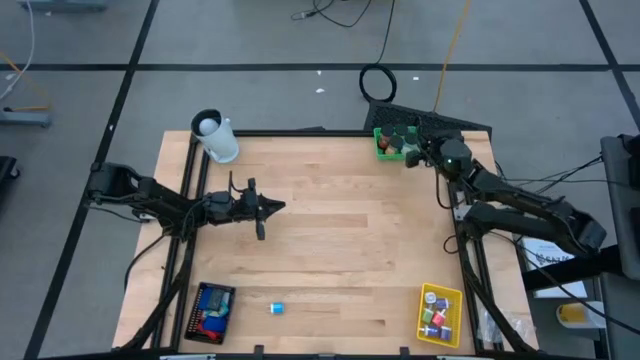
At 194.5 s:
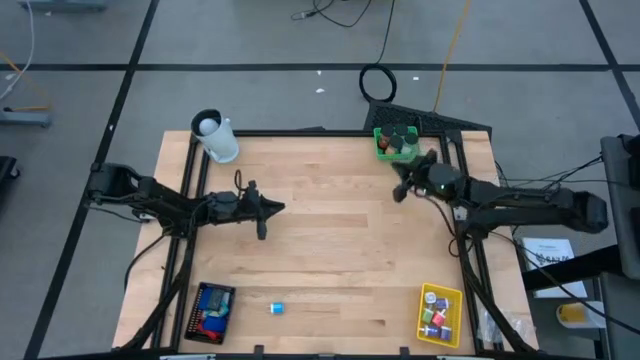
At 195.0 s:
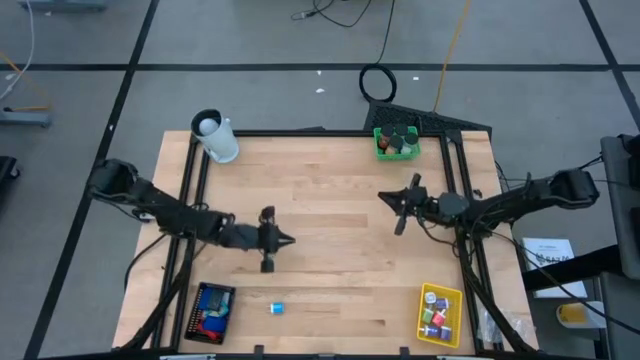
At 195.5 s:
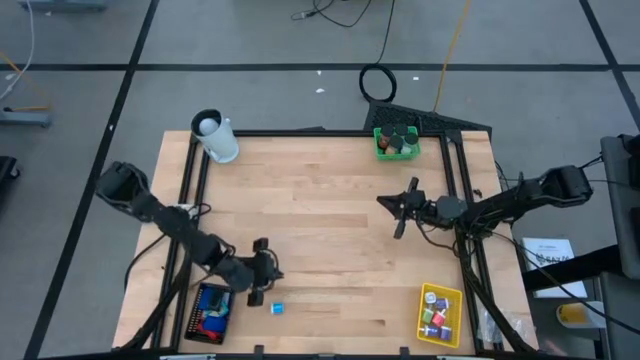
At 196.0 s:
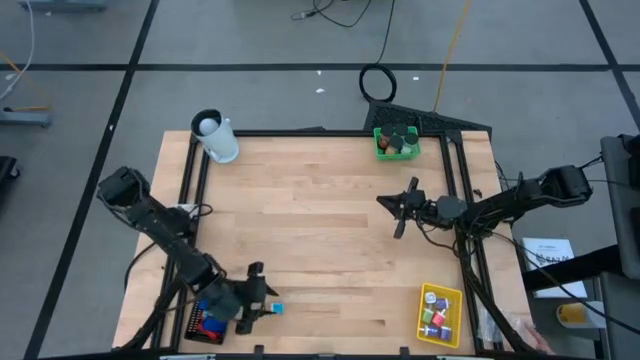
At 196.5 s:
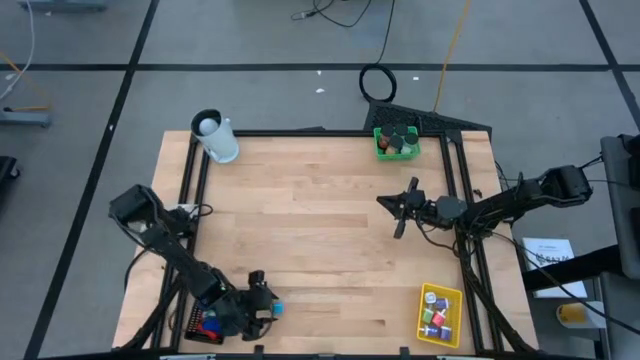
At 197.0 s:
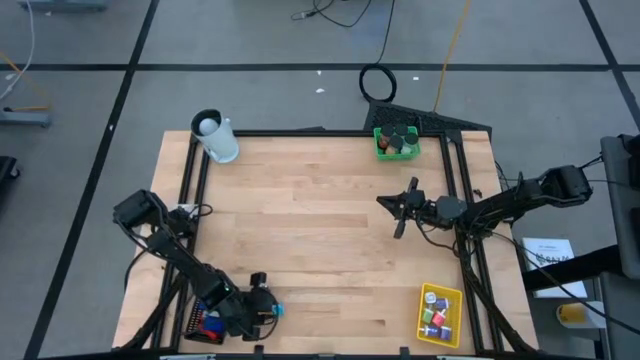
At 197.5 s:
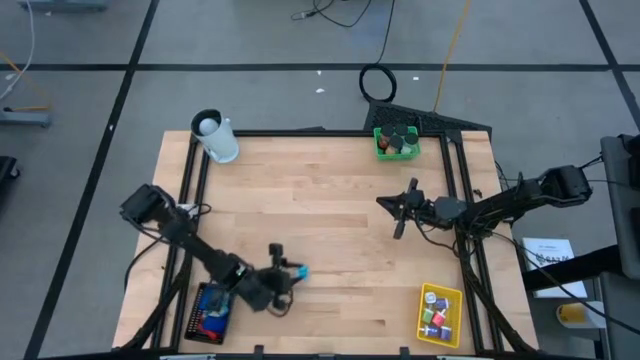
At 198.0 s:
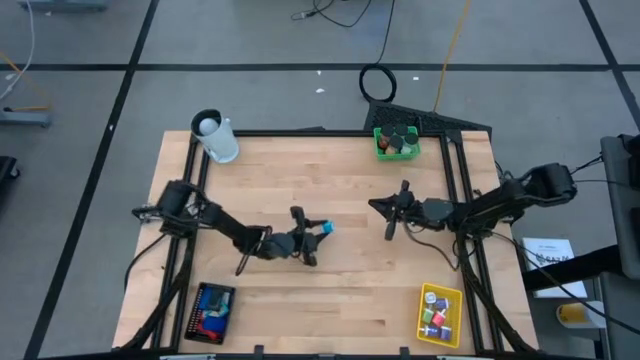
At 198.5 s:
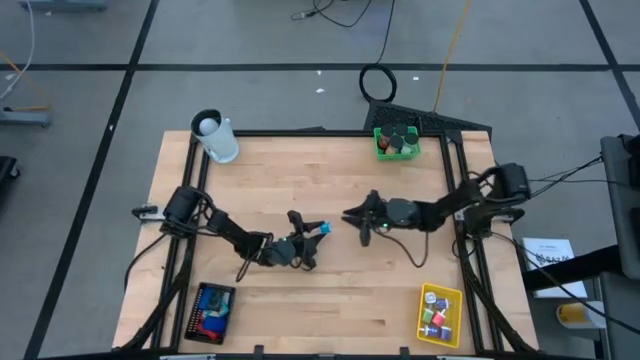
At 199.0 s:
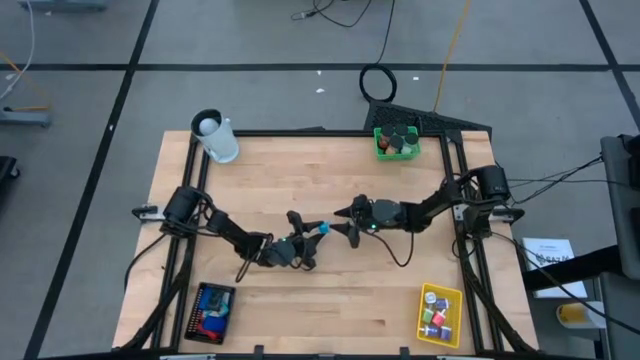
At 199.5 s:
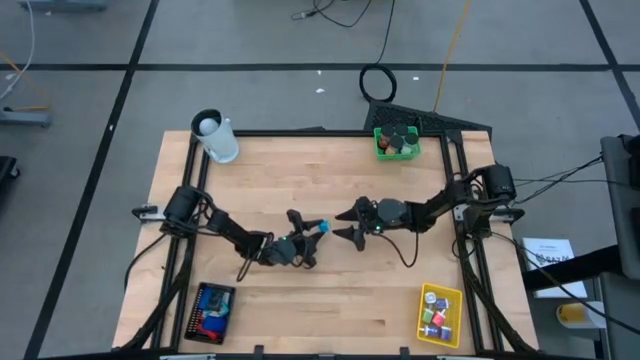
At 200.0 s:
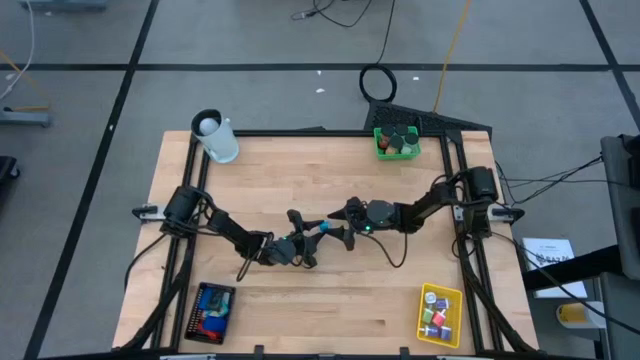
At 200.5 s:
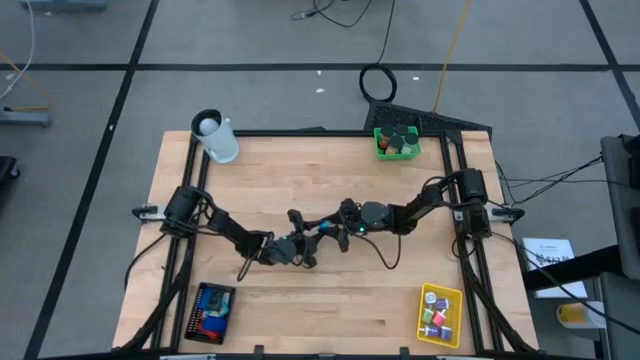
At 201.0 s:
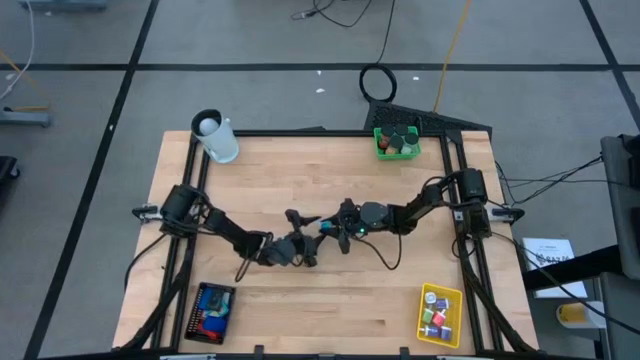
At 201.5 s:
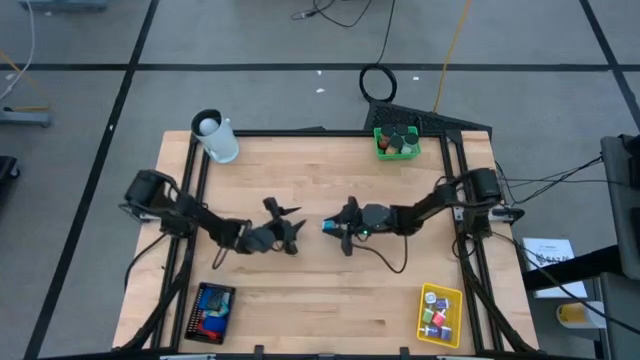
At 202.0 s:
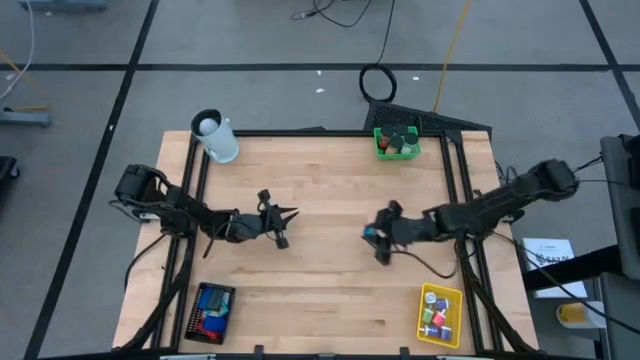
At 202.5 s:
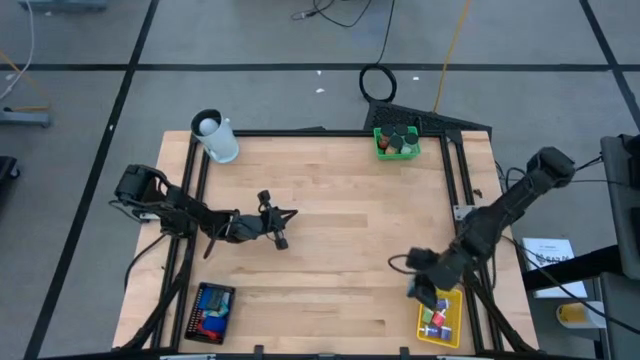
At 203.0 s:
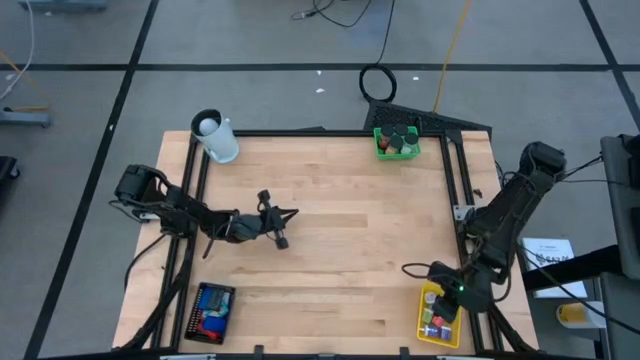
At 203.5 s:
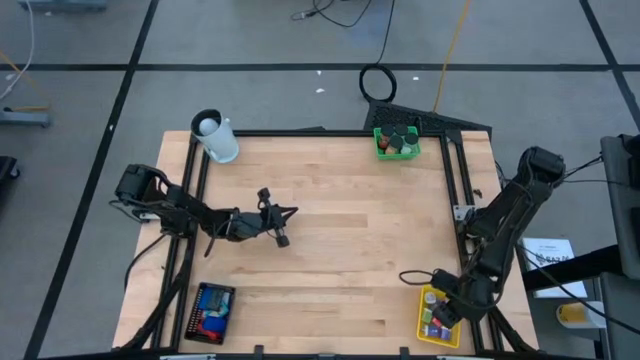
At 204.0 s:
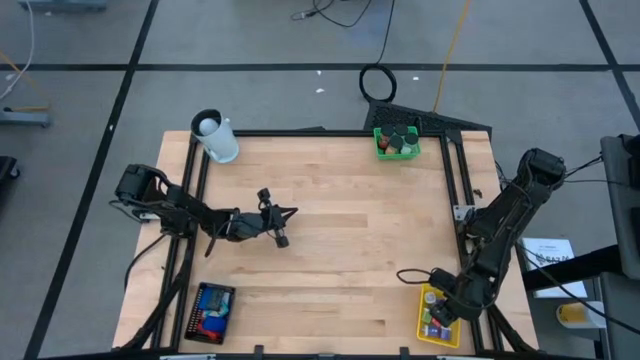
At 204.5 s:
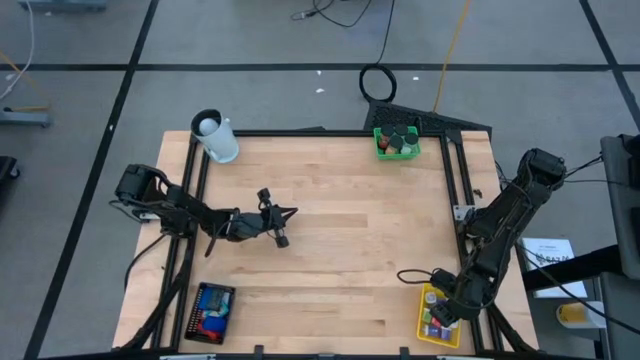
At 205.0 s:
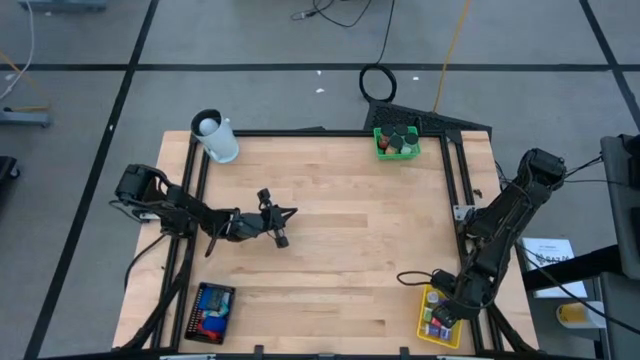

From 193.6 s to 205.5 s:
Task: Pick & Place Office items
Put the blue charger adapter into the yellow bin

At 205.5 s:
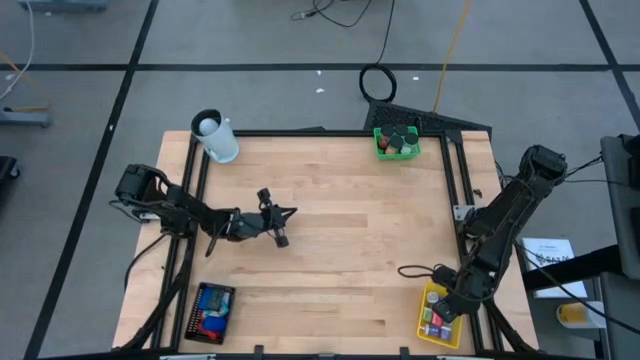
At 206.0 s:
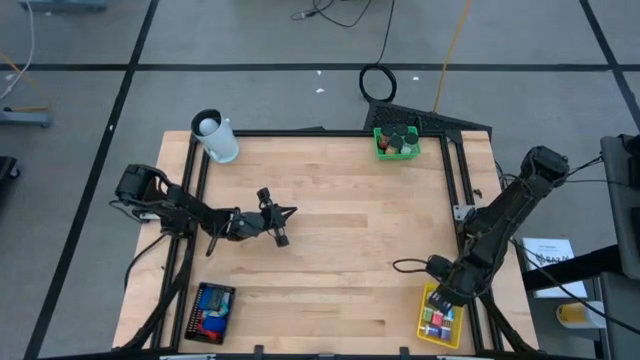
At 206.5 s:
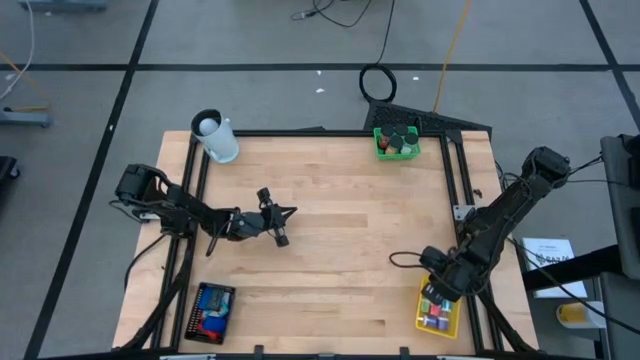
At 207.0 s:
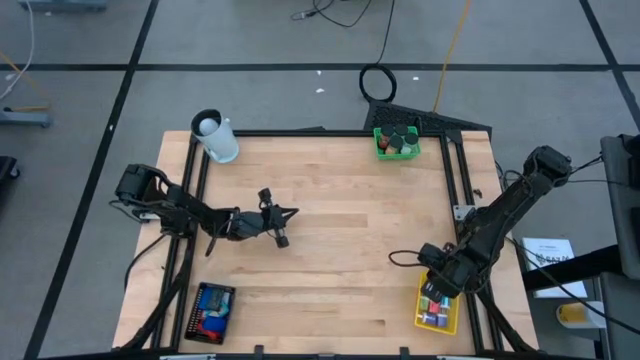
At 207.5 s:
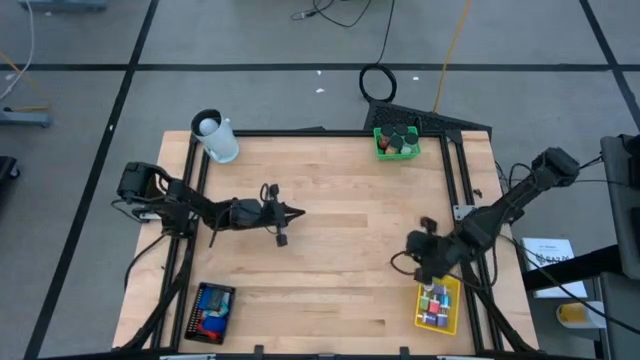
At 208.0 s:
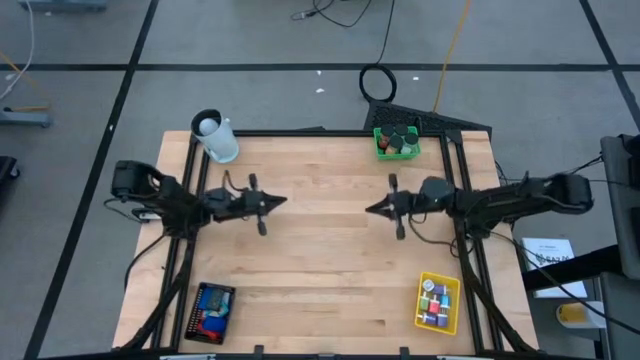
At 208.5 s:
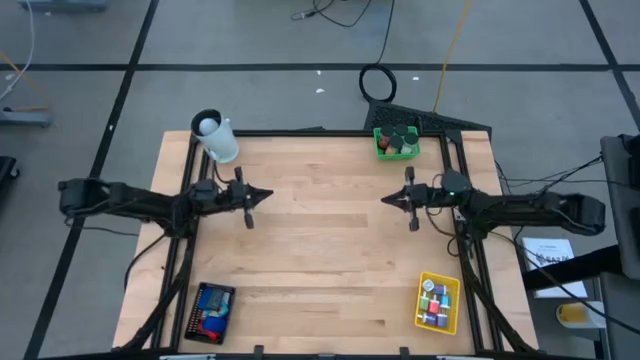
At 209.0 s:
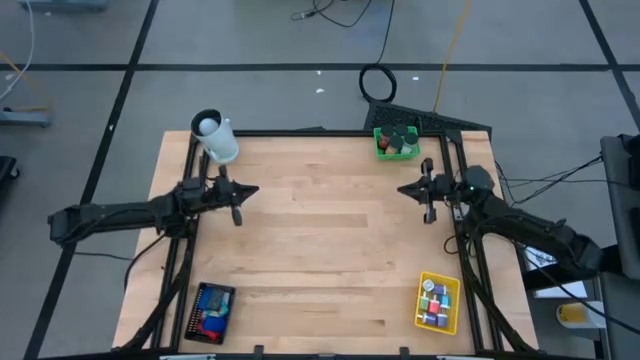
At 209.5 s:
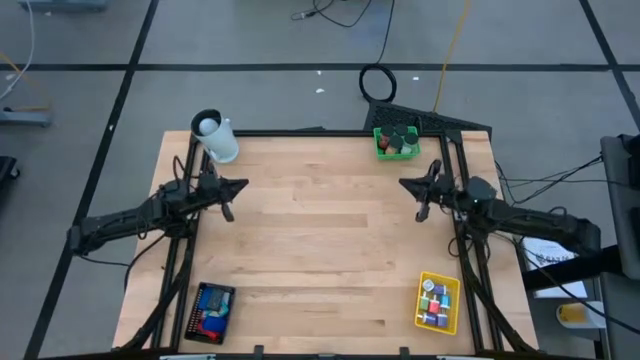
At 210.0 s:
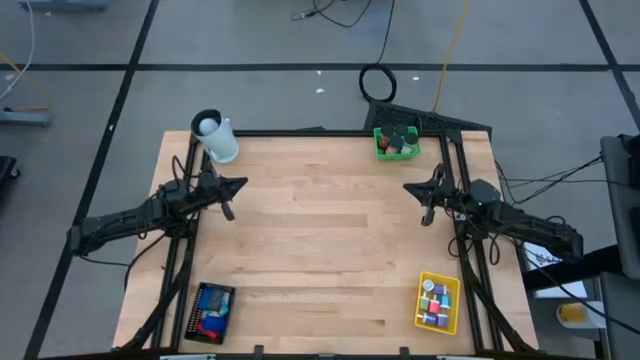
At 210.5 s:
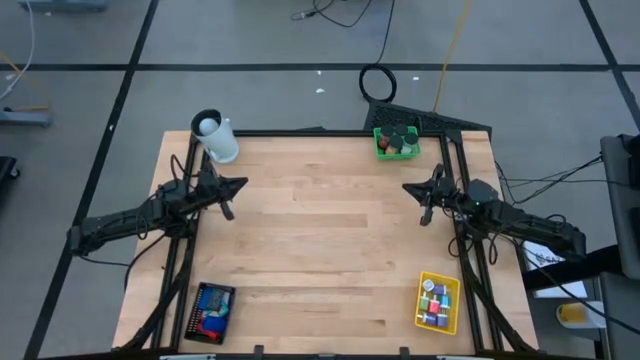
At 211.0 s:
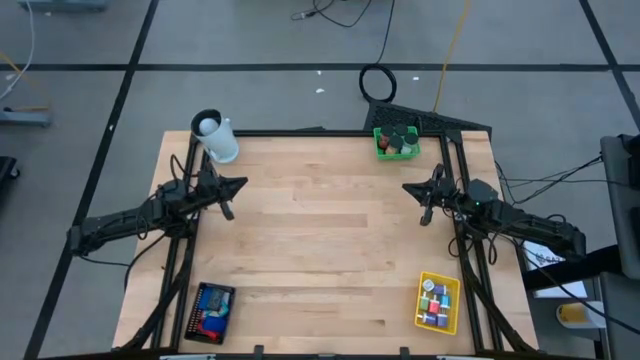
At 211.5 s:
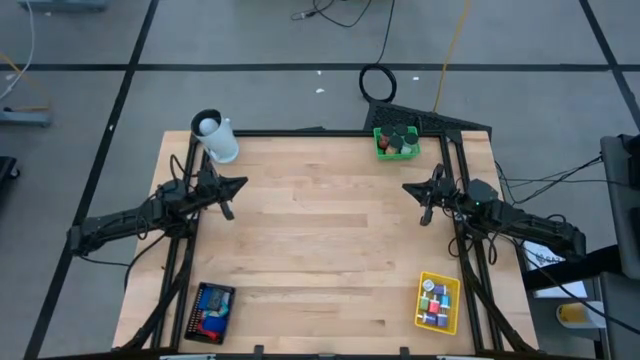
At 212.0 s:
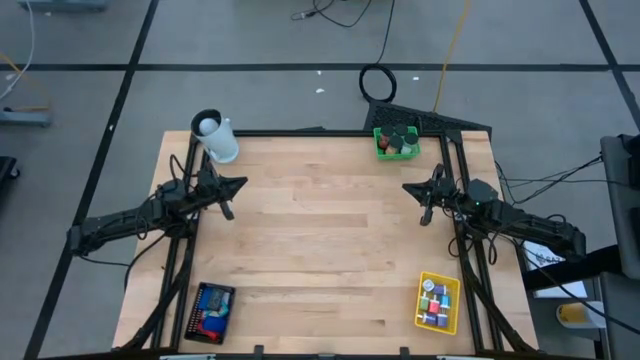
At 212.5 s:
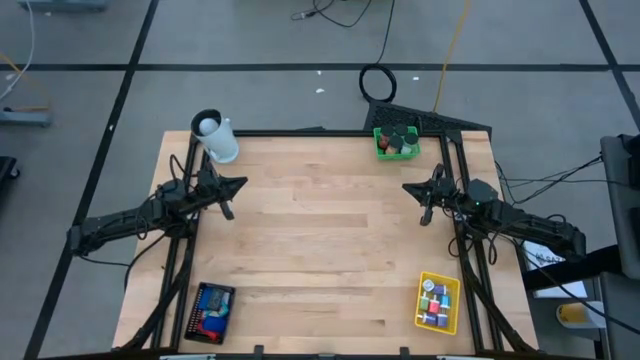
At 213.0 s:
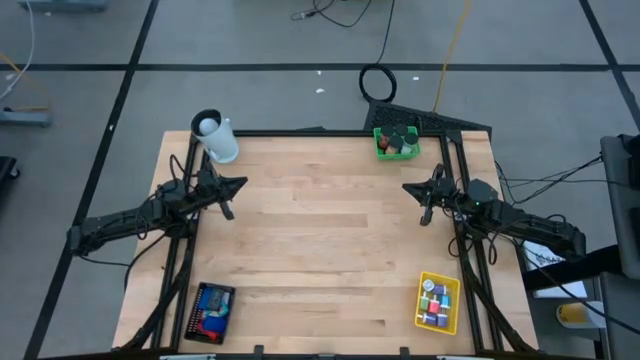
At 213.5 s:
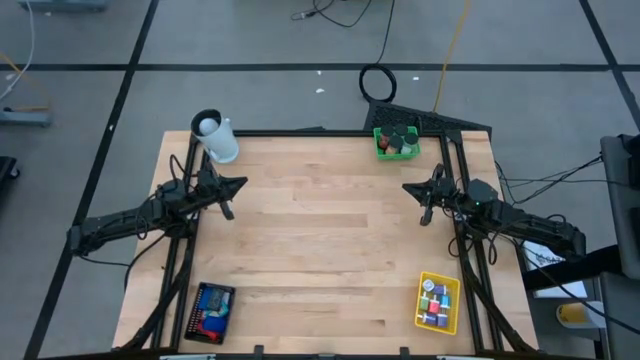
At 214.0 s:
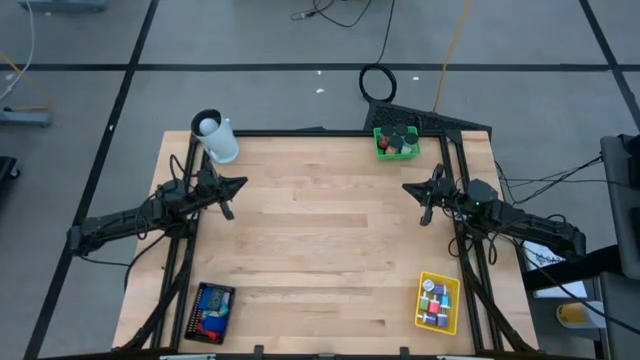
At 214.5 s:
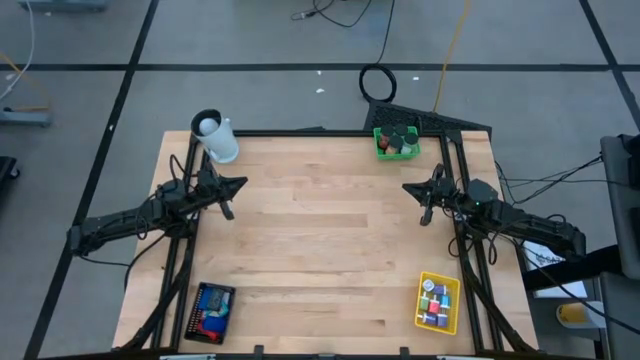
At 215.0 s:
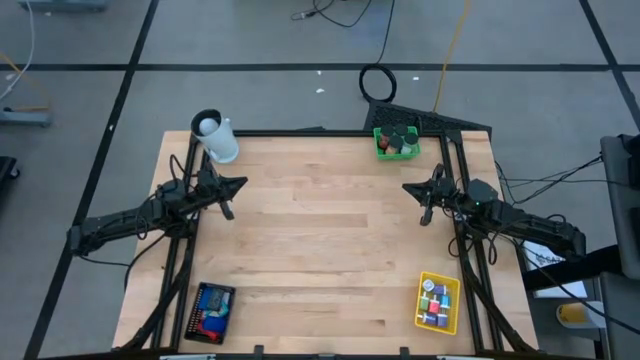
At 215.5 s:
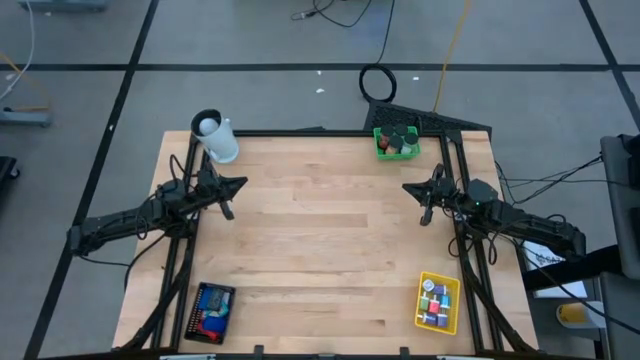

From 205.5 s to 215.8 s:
Return to Home Position

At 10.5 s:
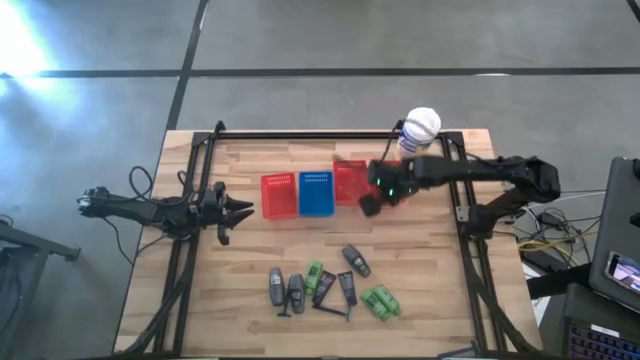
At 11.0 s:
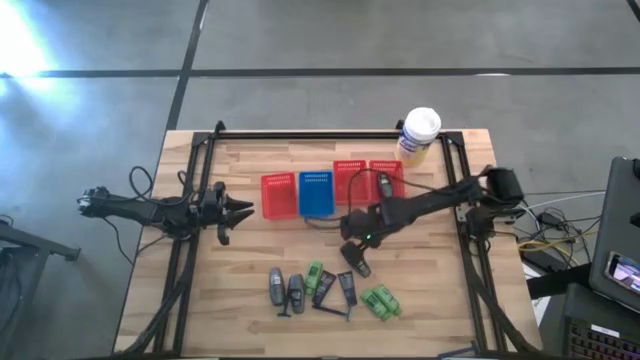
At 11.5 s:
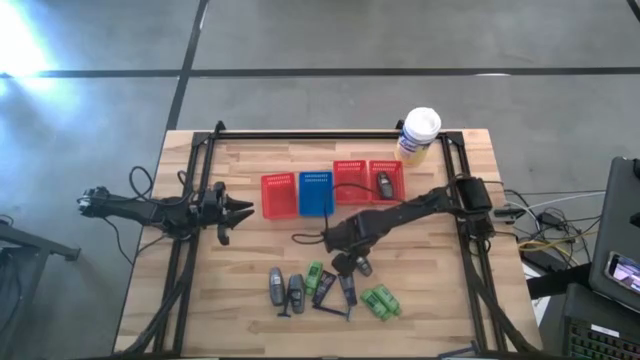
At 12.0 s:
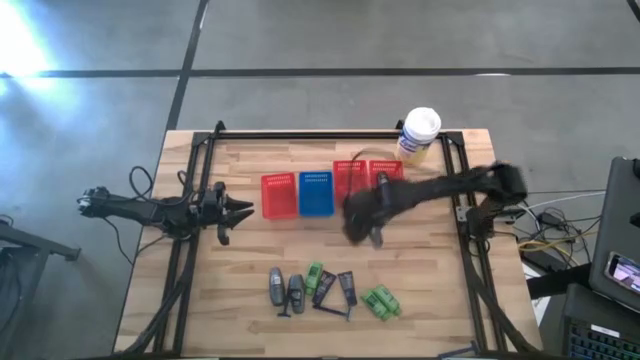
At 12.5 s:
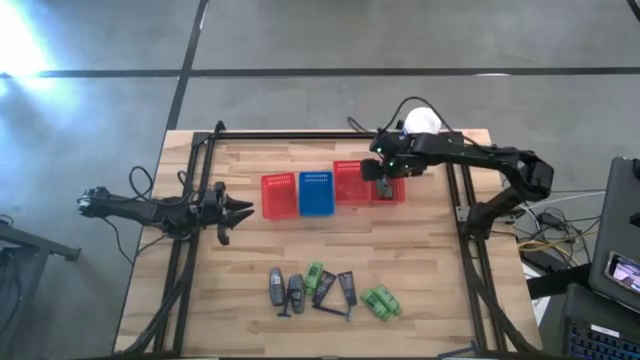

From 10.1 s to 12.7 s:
Task: Pick & Place Travel size toiletries
Put the gray deodorant into the right red bin
